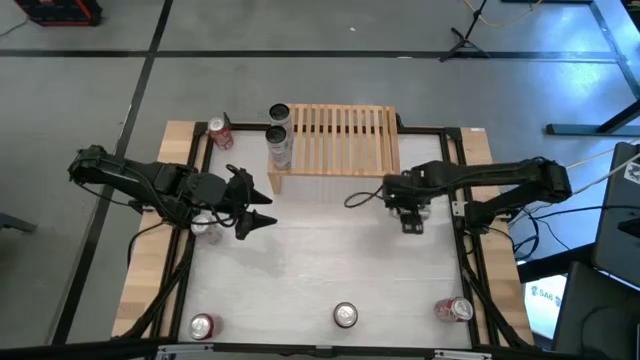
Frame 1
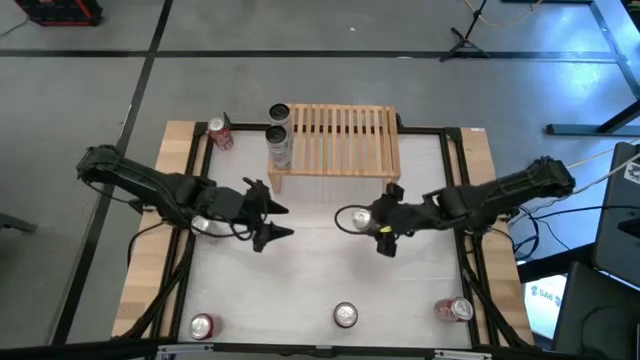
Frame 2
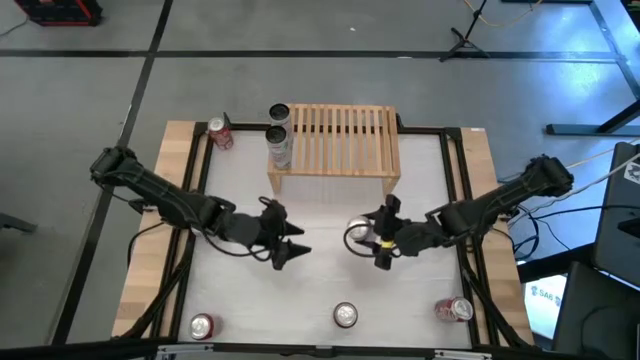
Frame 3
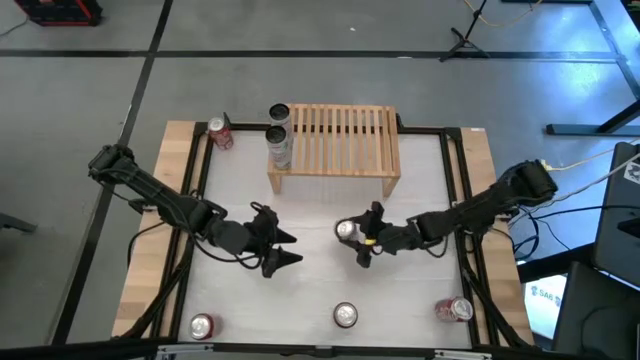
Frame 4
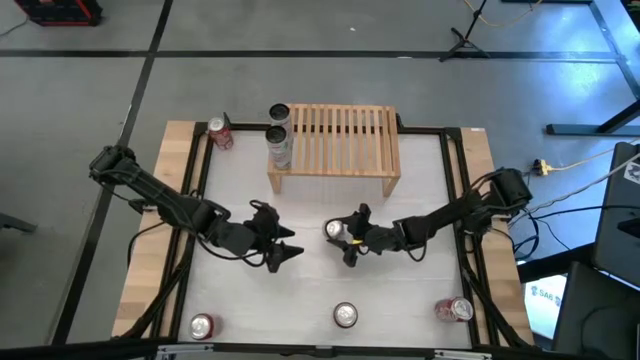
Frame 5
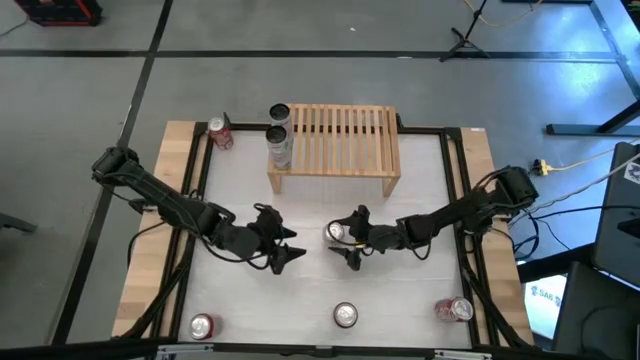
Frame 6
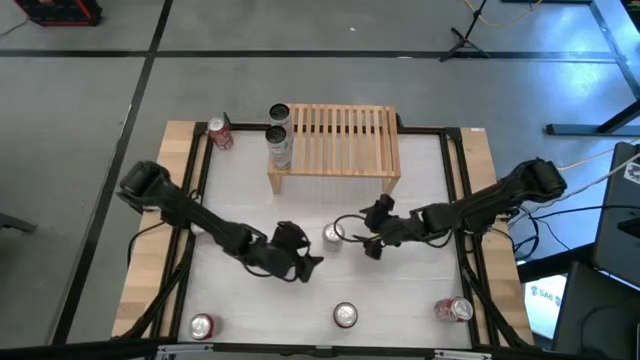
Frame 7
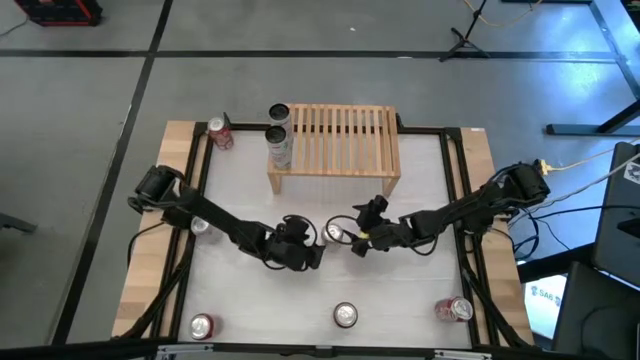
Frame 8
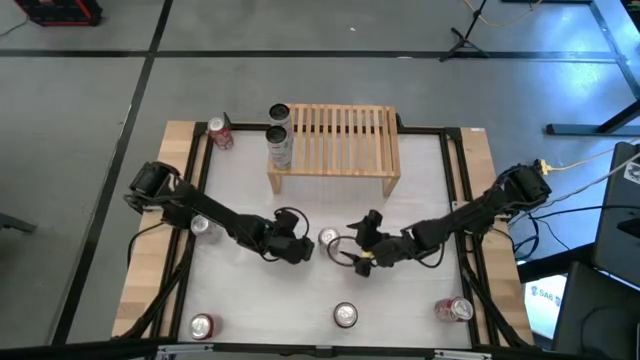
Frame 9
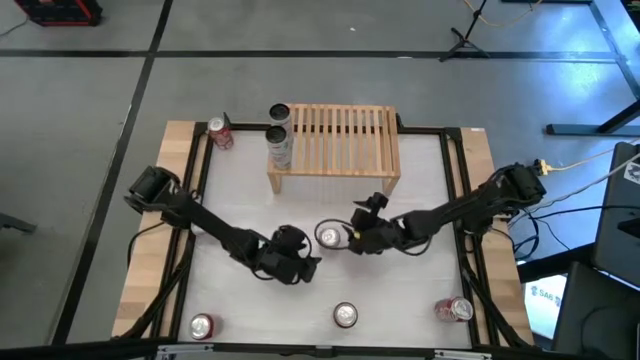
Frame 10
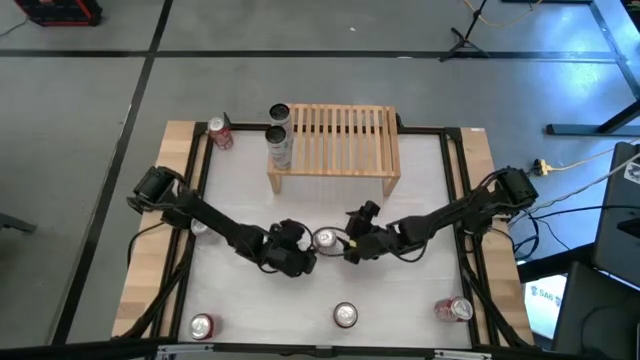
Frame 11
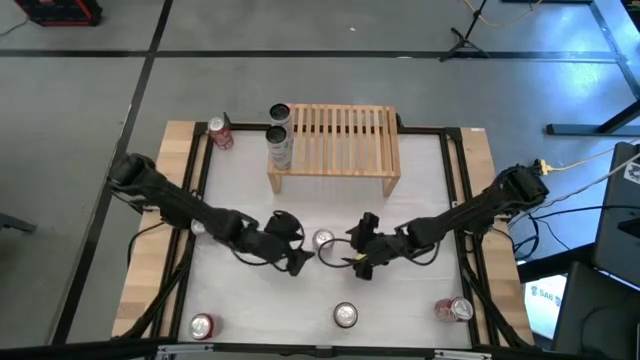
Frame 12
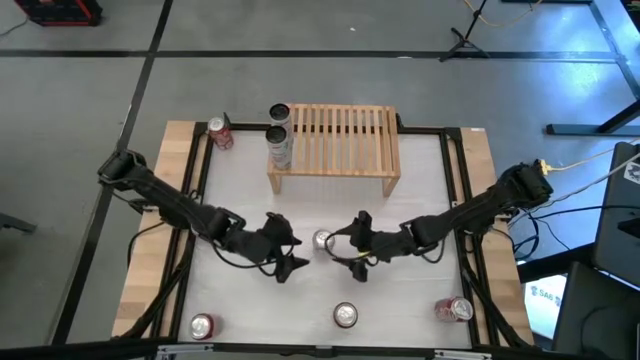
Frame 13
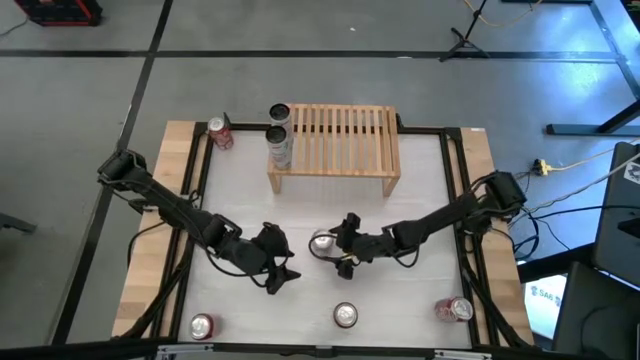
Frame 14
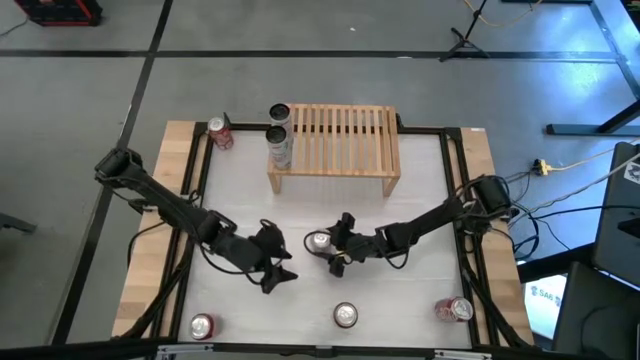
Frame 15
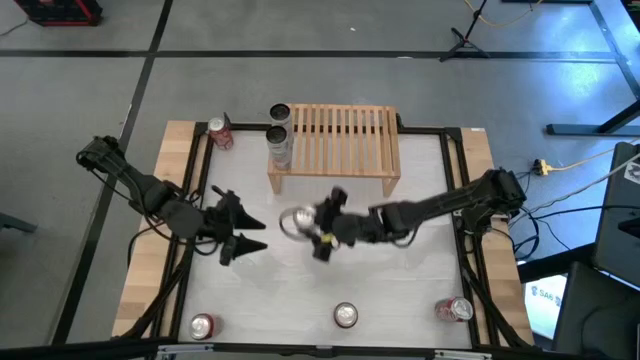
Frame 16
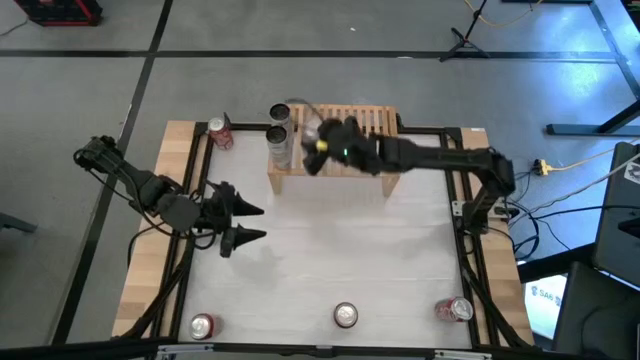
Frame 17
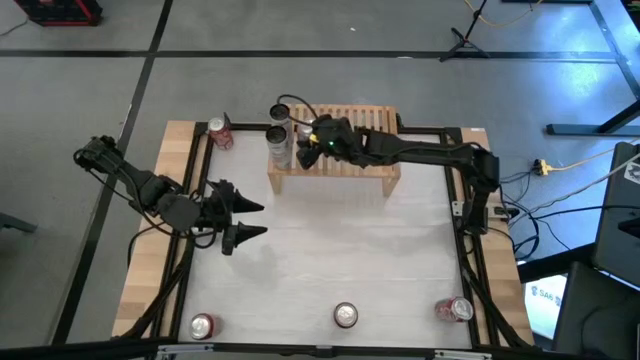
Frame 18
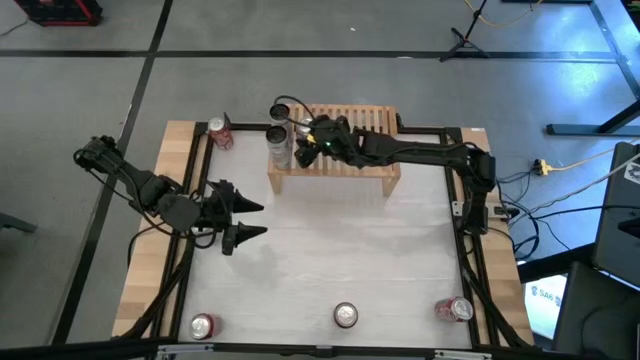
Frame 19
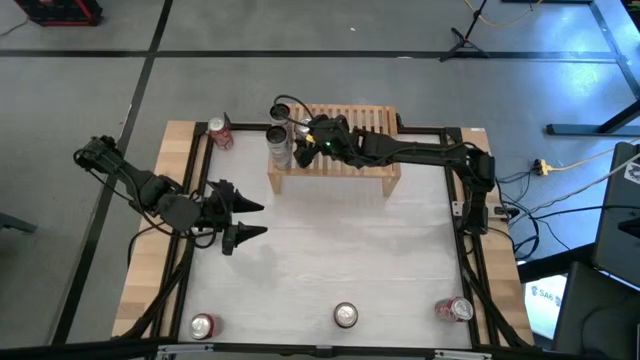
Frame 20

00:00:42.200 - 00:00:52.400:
Task: Place canned beverage on shelf
Put the silver soda can on the shelf

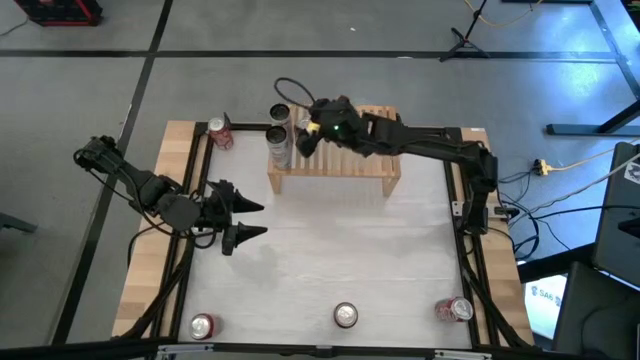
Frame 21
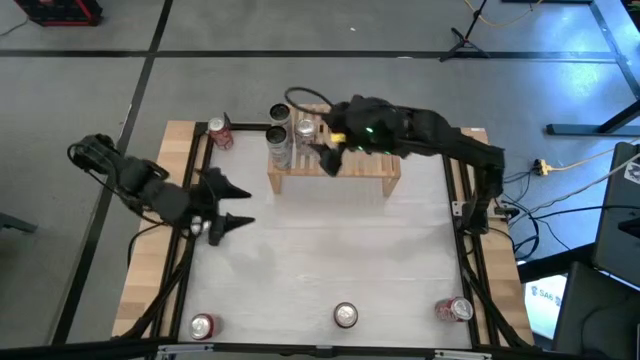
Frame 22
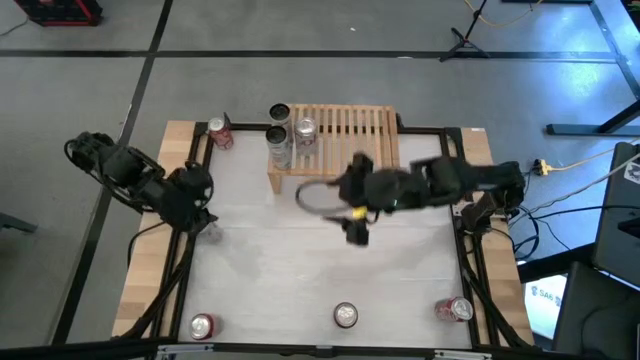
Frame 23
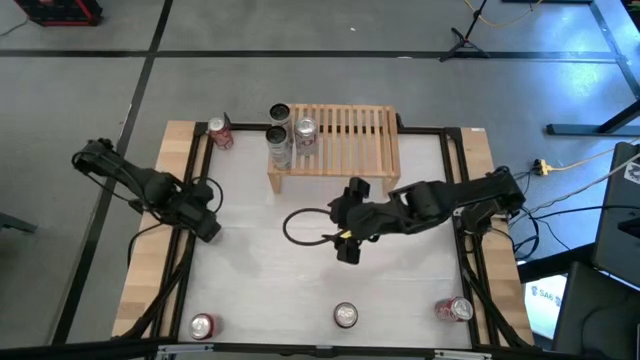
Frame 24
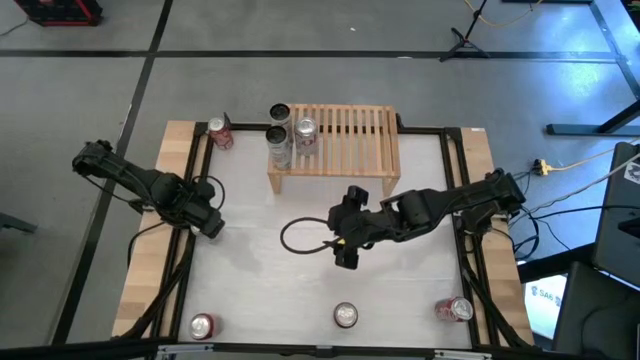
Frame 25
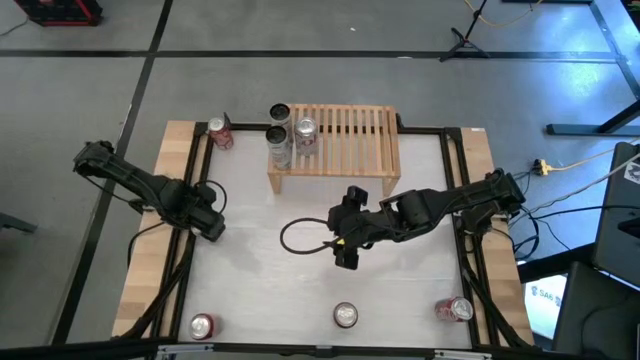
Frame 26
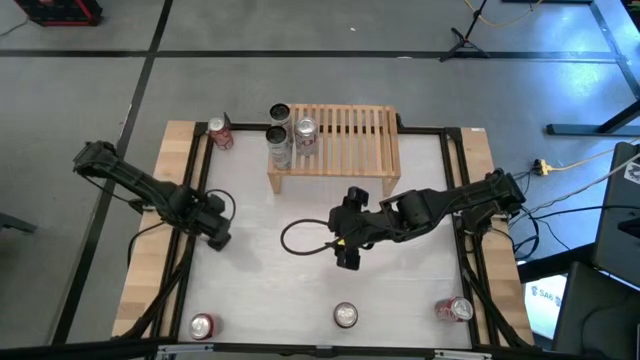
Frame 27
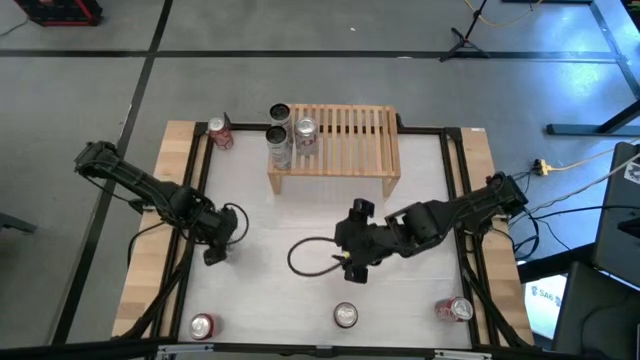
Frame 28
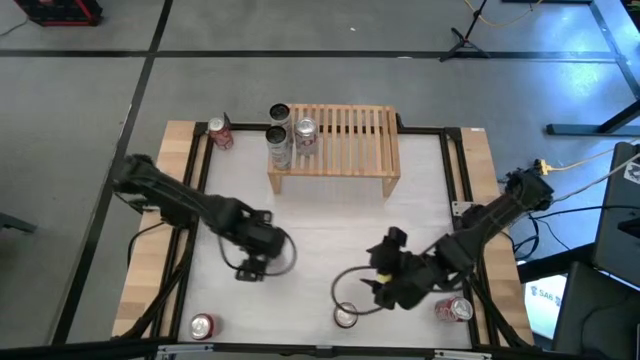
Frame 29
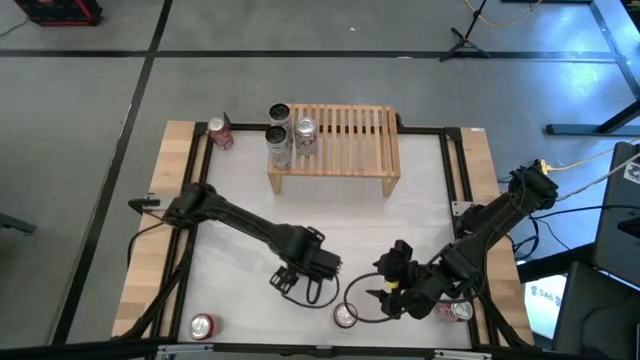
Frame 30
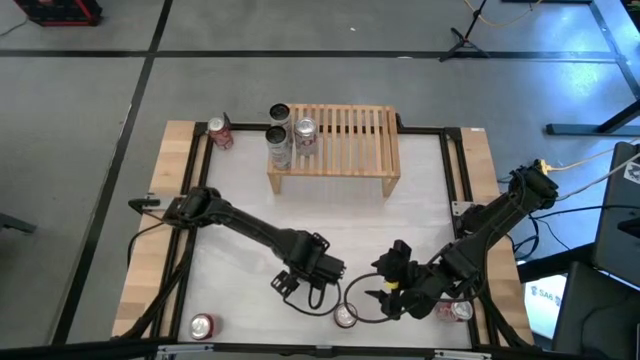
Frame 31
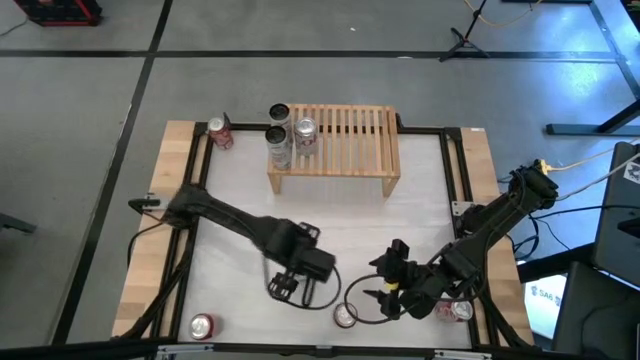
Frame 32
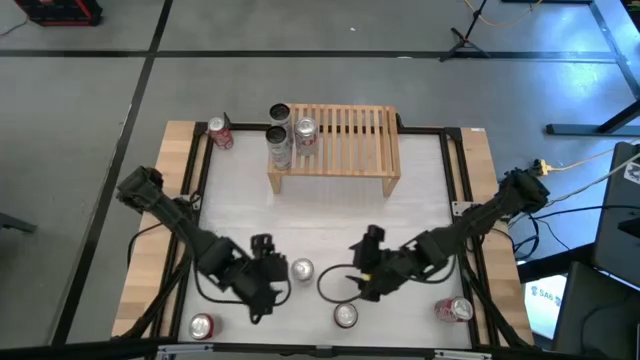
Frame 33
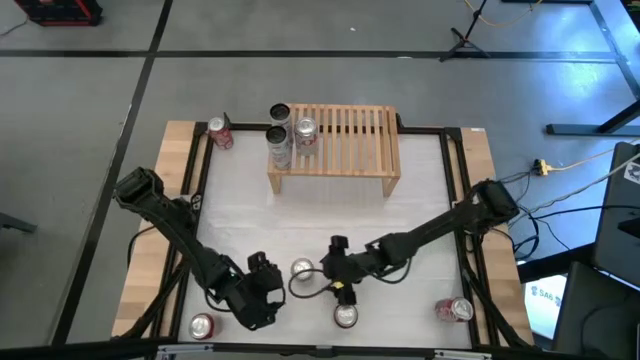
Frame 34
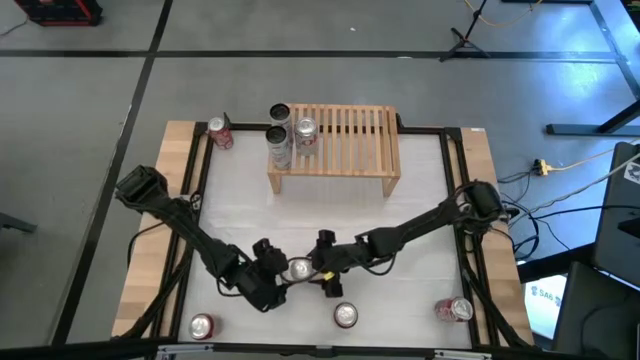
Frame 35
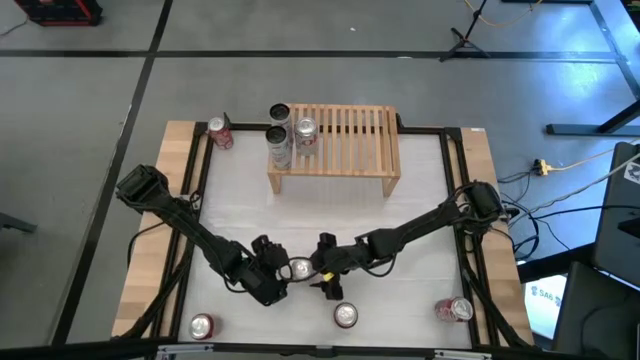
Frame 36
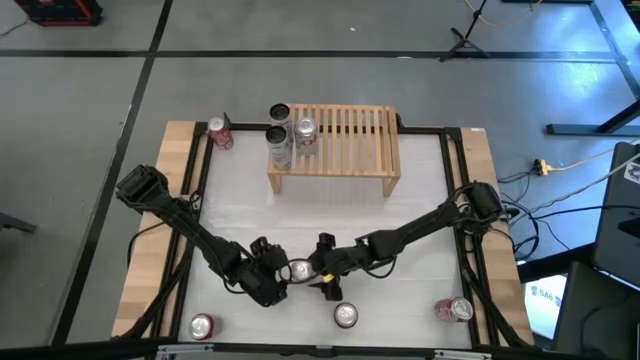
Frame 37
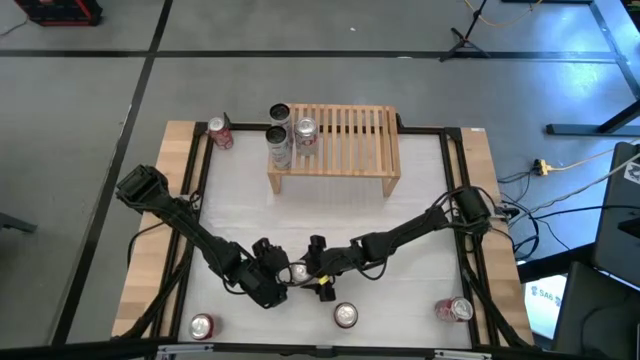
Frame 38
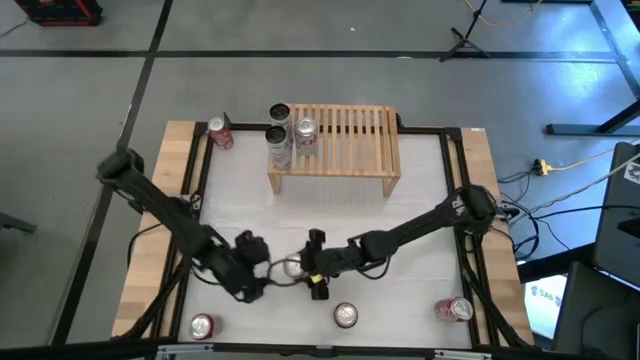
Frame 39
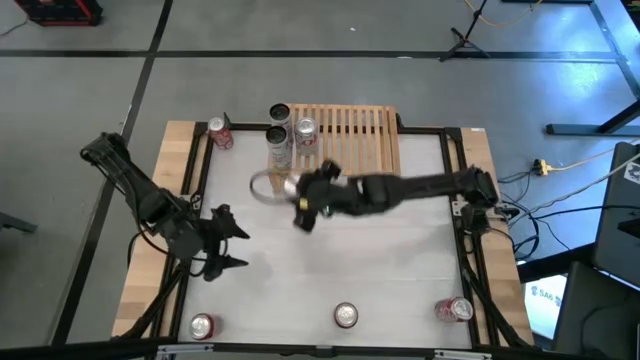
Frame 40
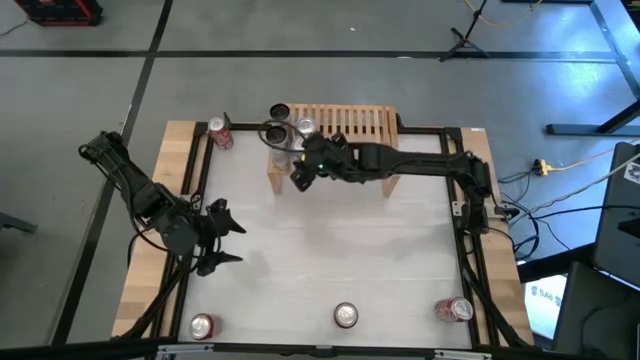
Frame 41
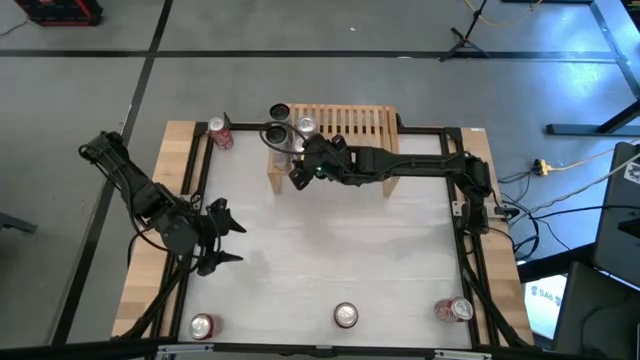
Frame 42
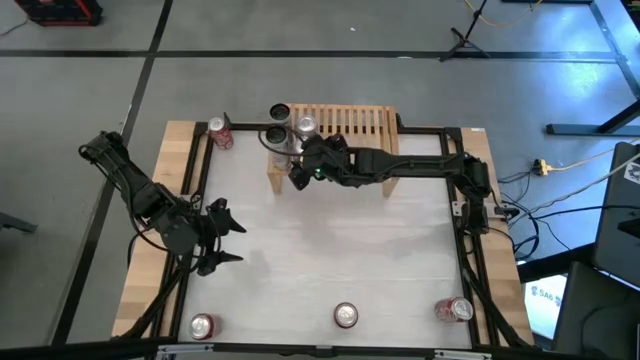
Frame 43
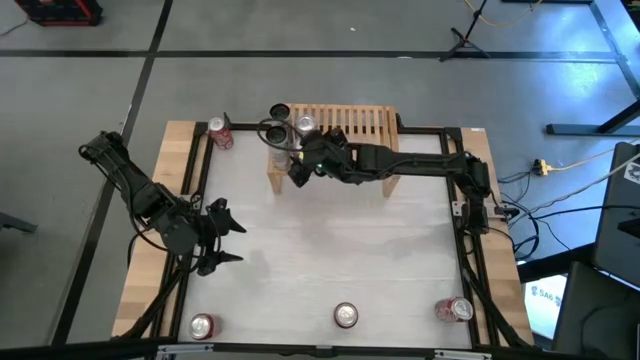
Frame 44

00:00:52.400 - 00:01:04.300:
Put the silver soda can on the shelf

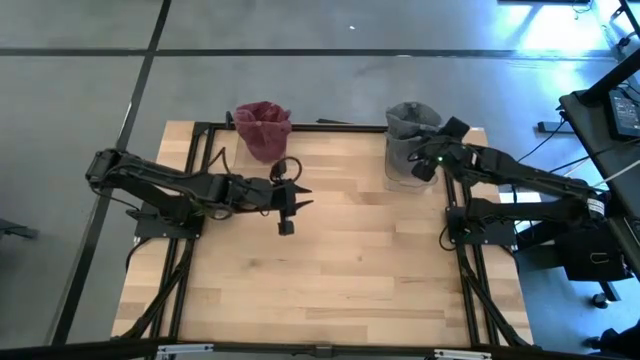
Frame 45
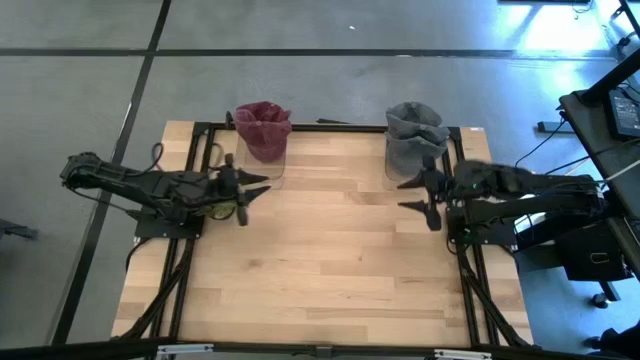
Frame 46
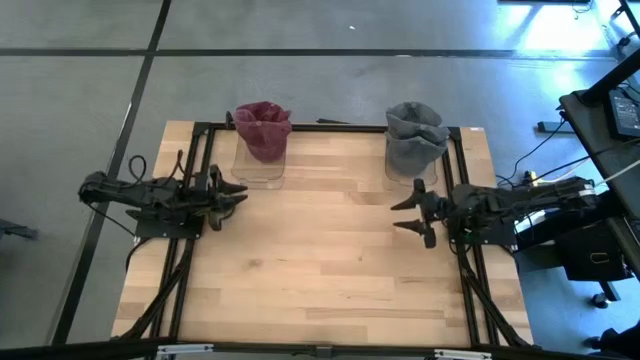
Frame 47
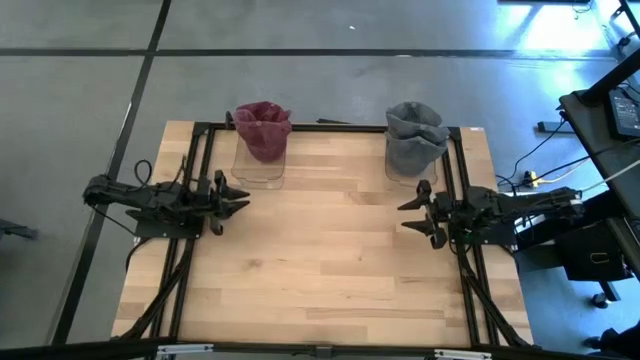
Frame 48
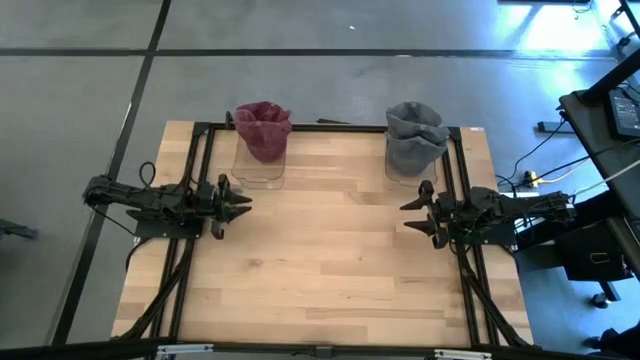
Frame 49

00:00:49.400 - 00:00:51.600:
Task: Pick & Place hat
Return to Home Position
